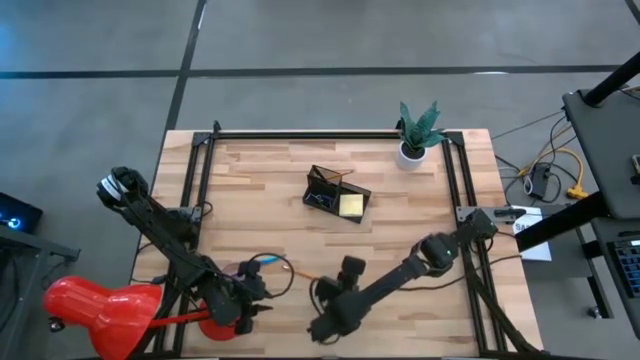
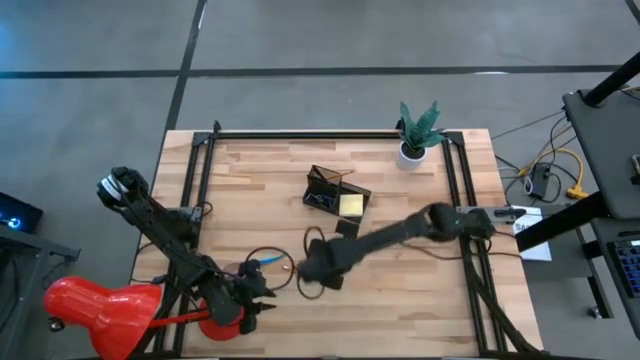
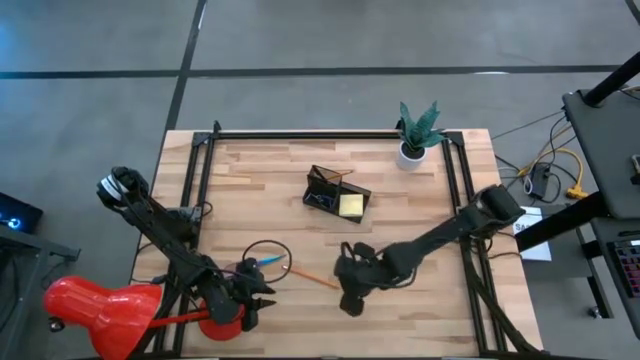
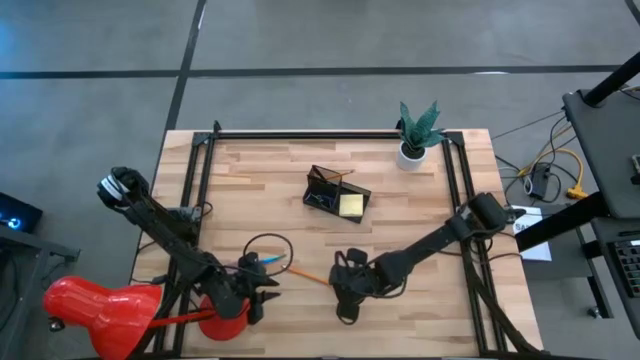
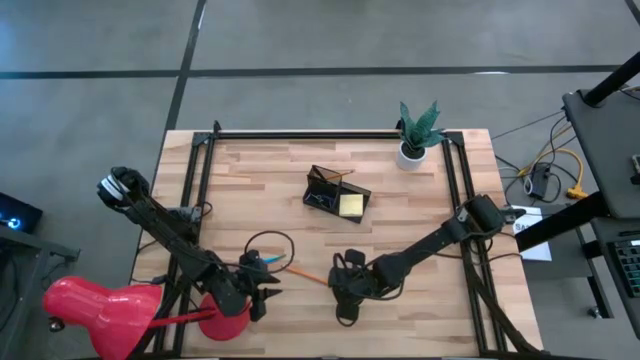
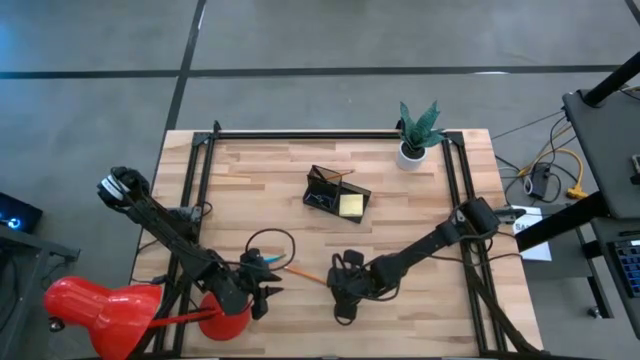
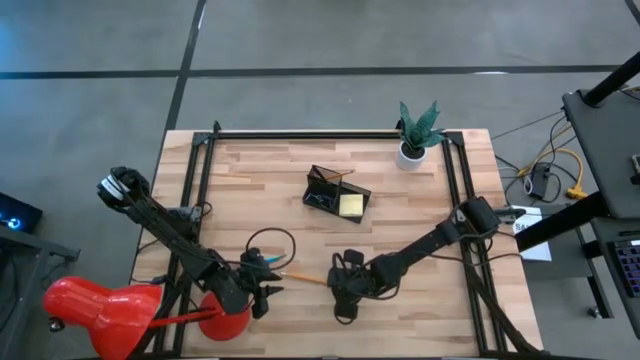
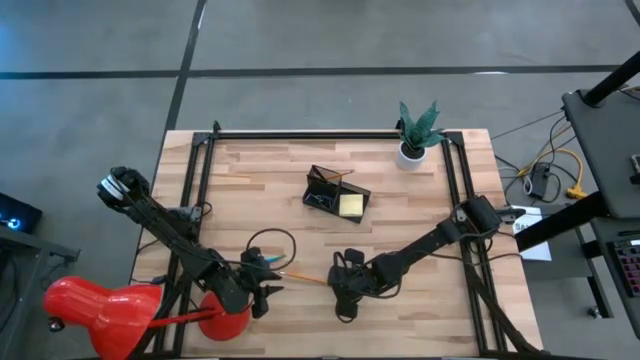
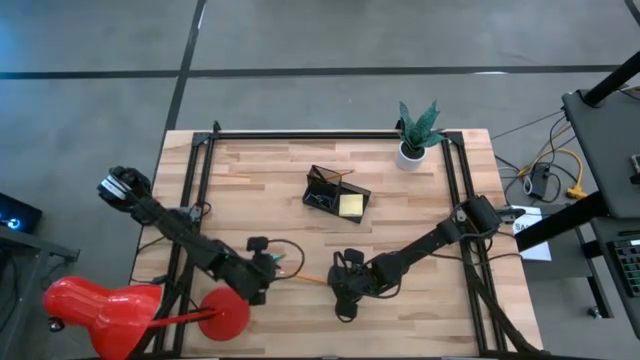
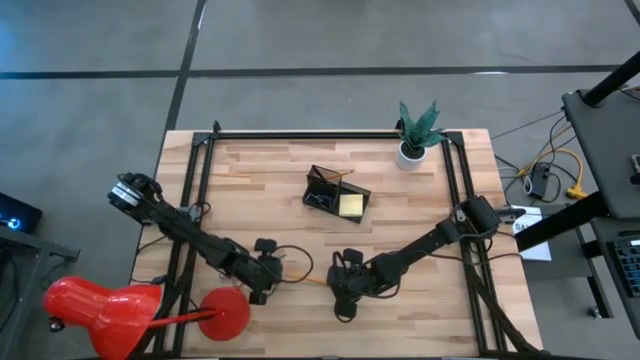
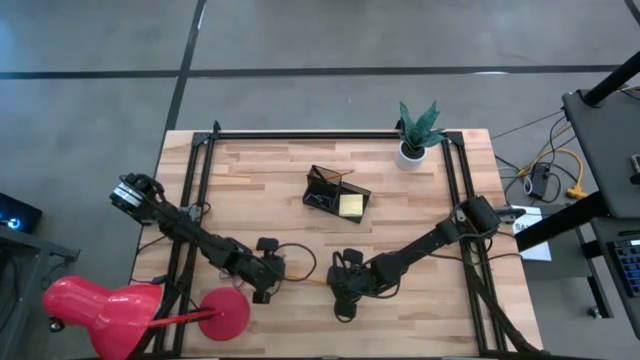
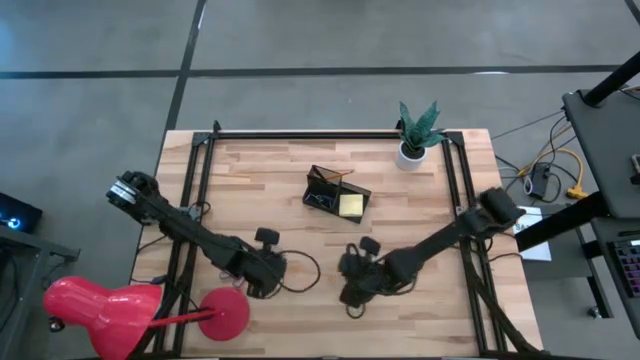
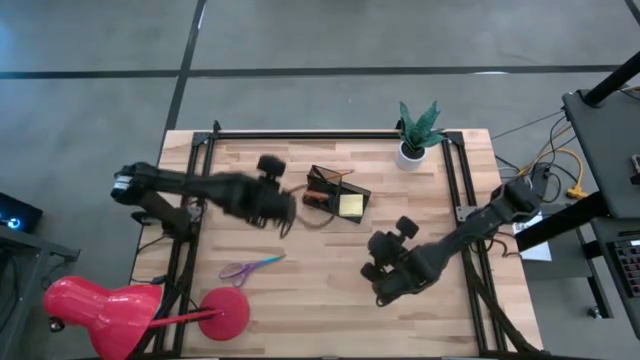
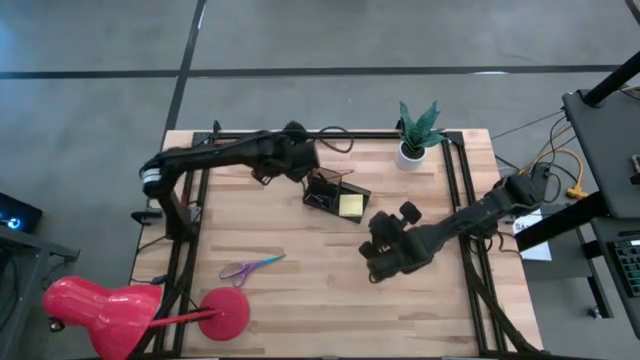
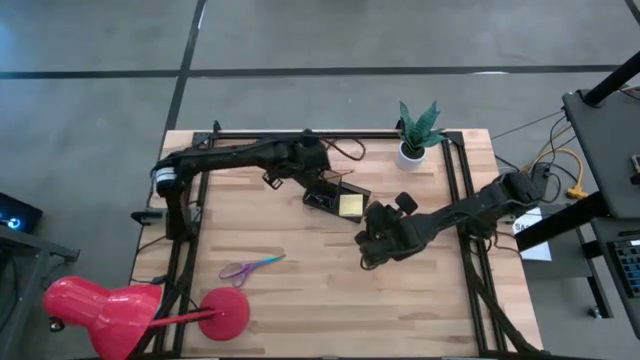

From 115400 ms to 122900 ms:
Task: Pick and place office supplies into organizer
Put the pencil into the desk organizer

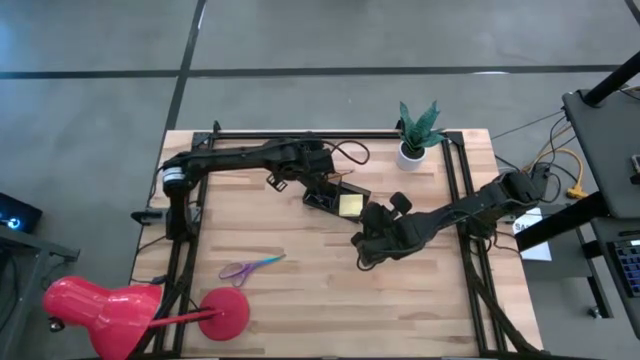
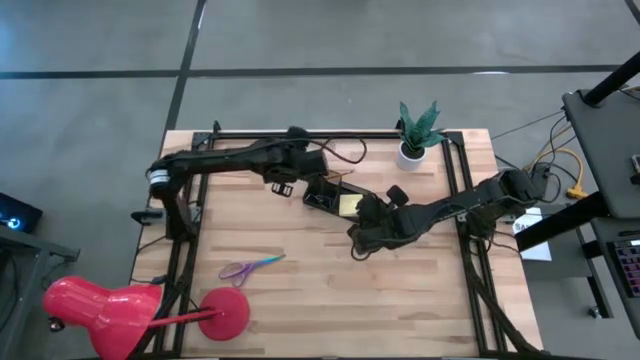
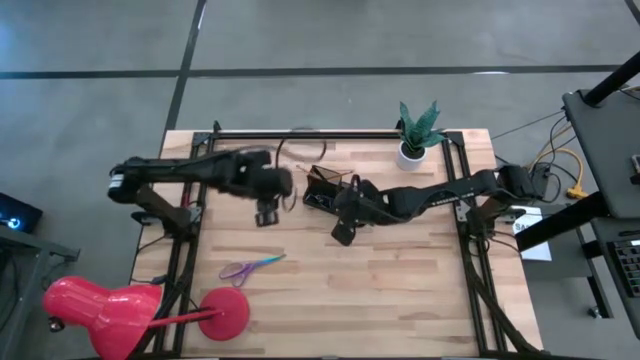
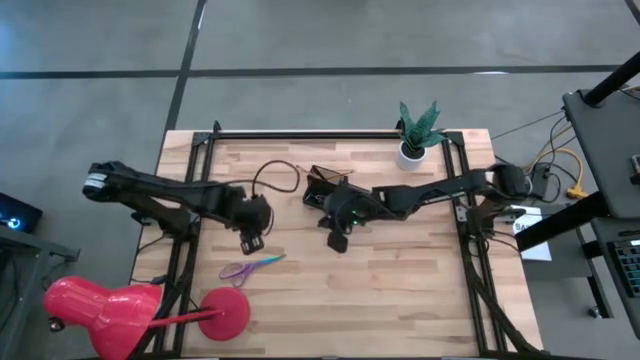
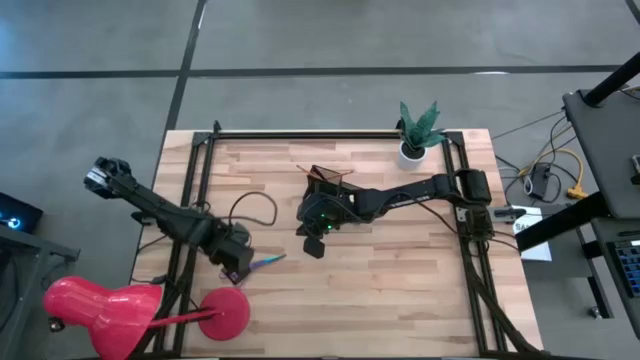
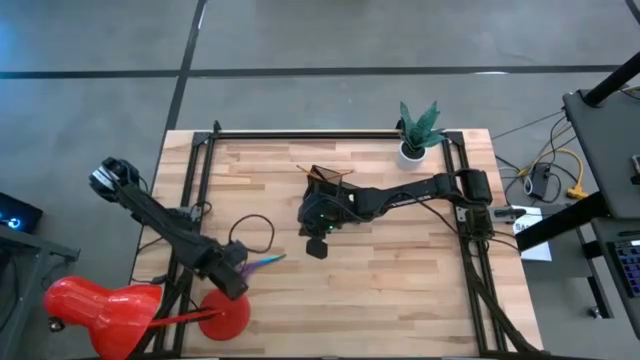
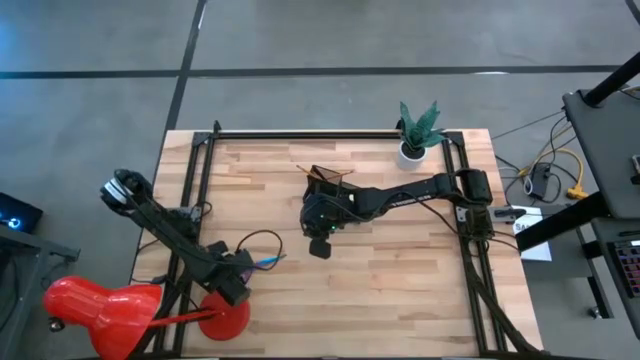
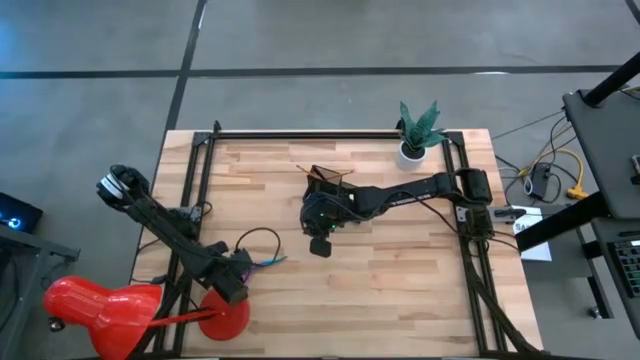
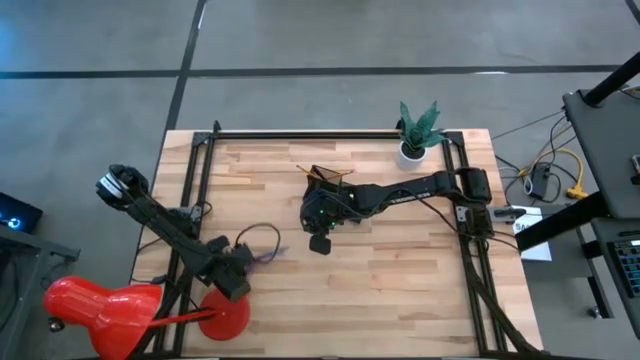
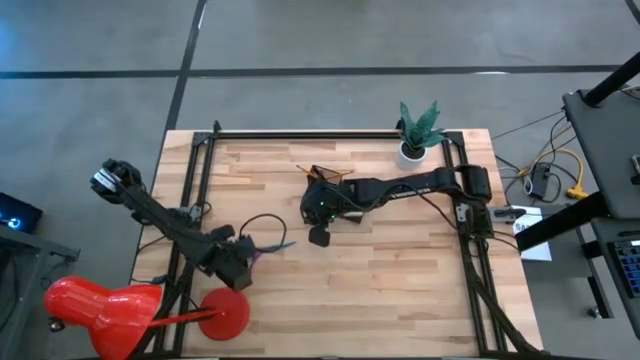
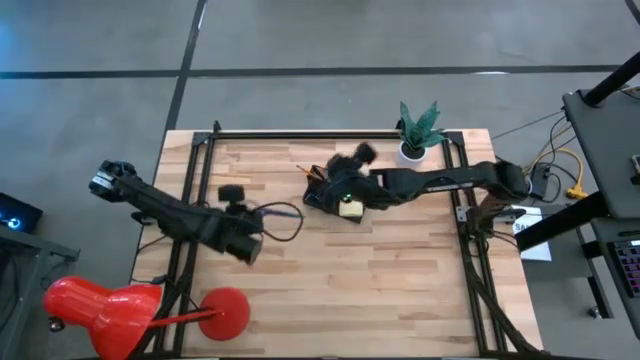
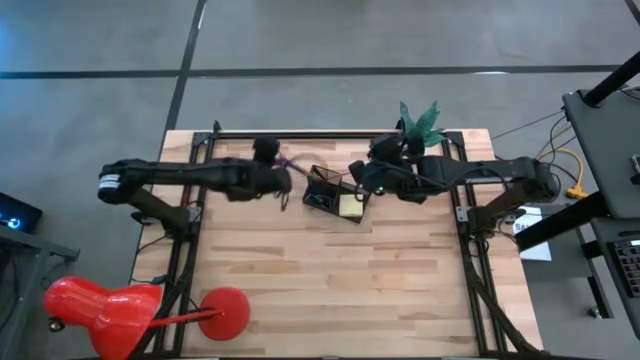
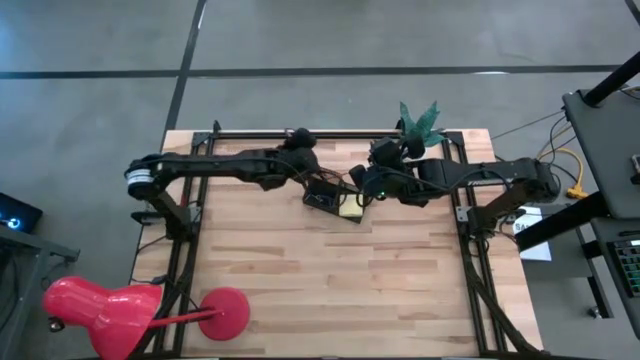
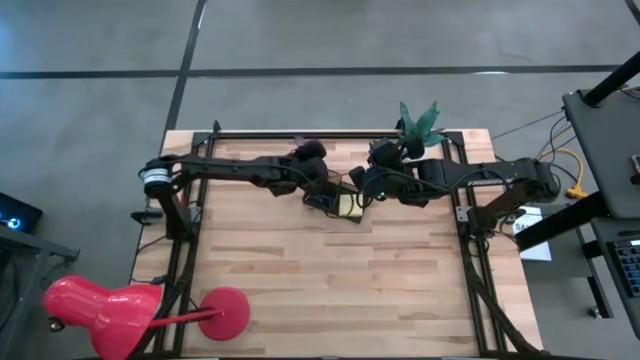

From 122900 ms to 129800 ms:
Put the scissors into the desk organizer

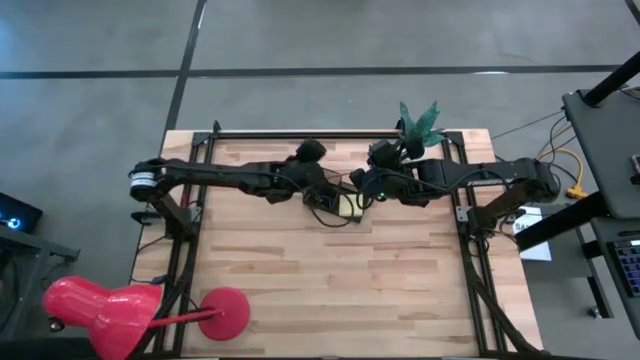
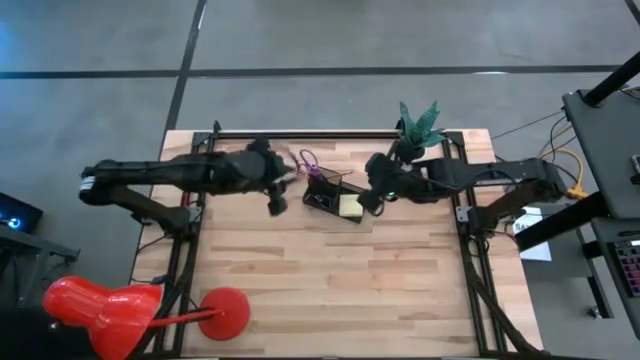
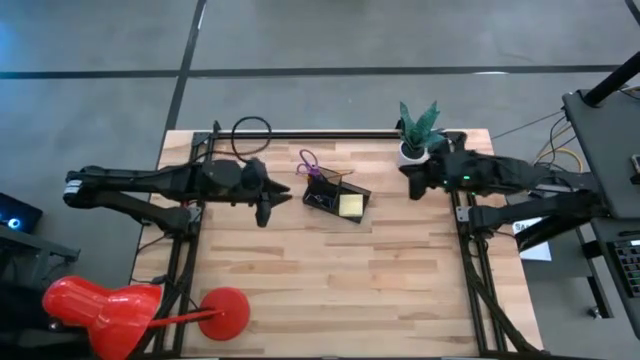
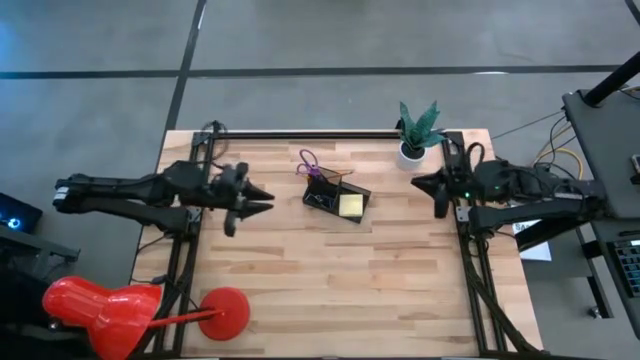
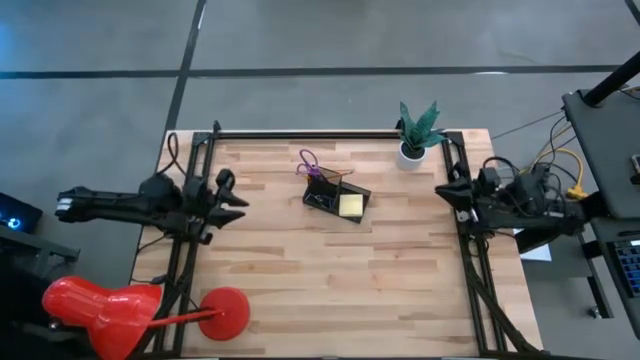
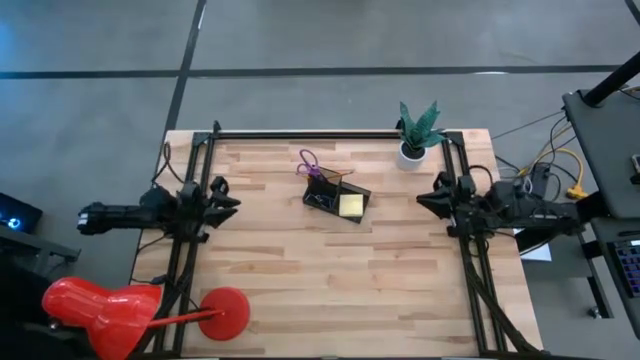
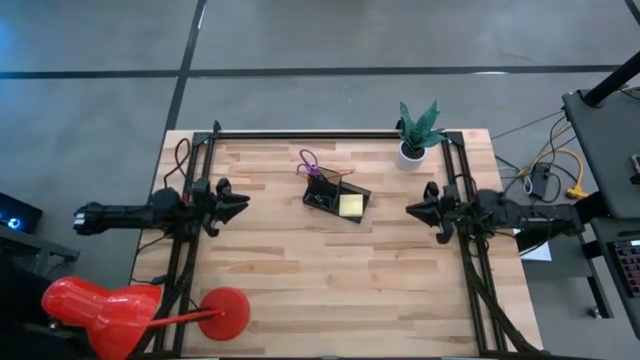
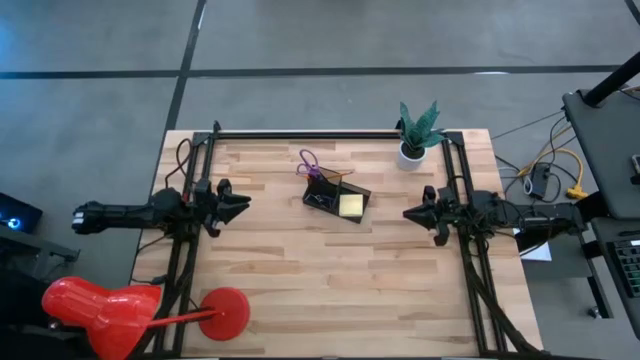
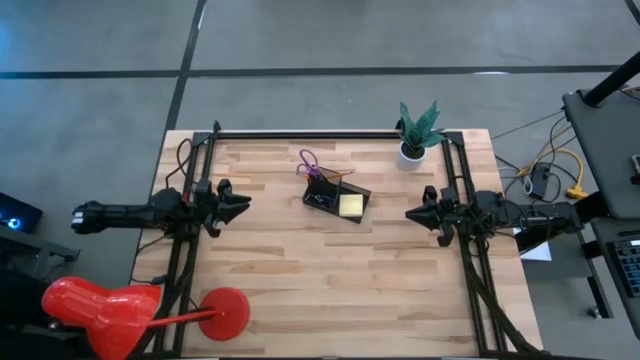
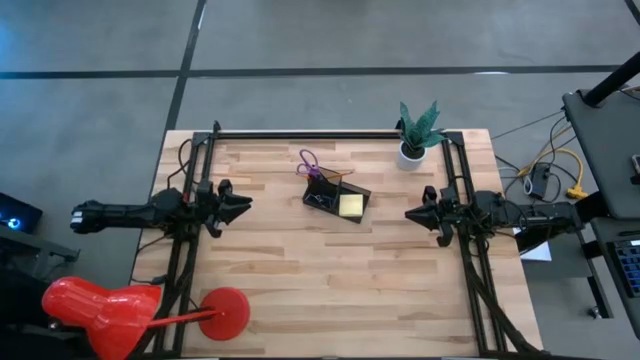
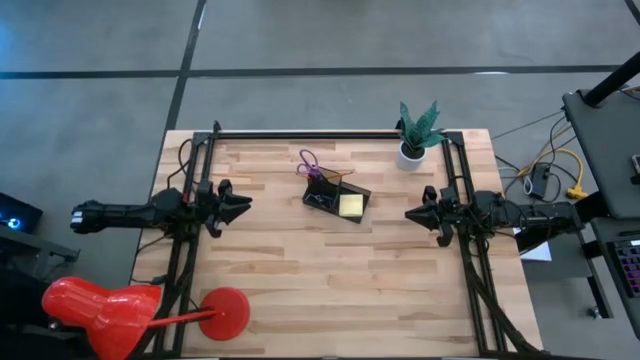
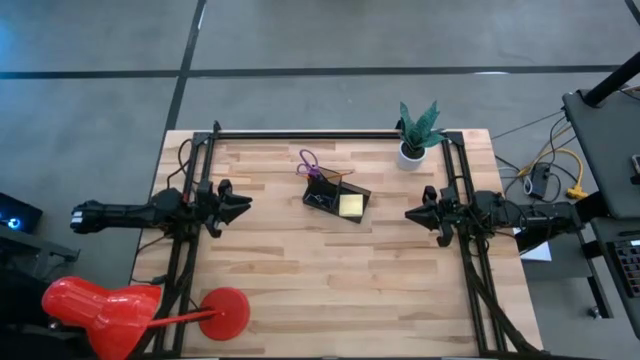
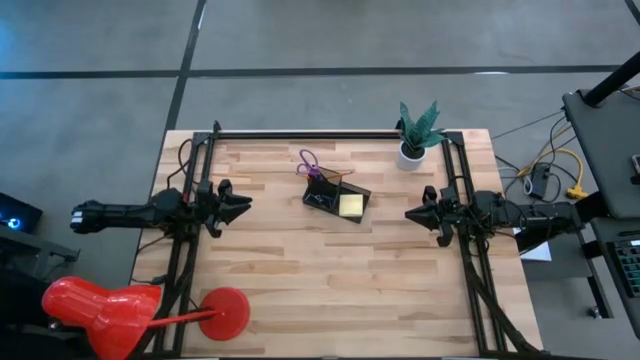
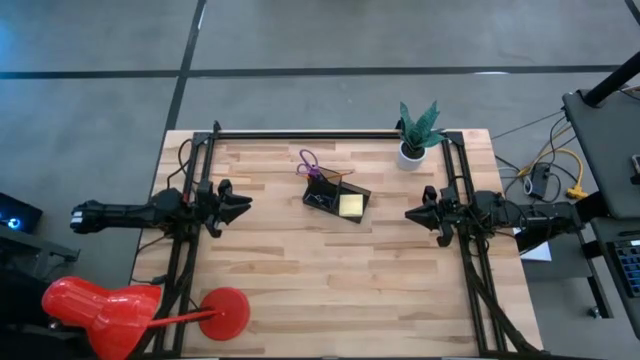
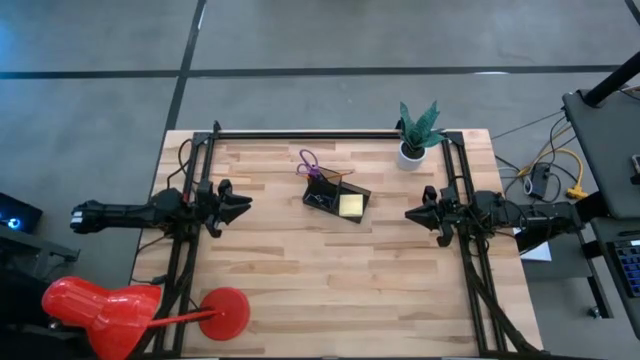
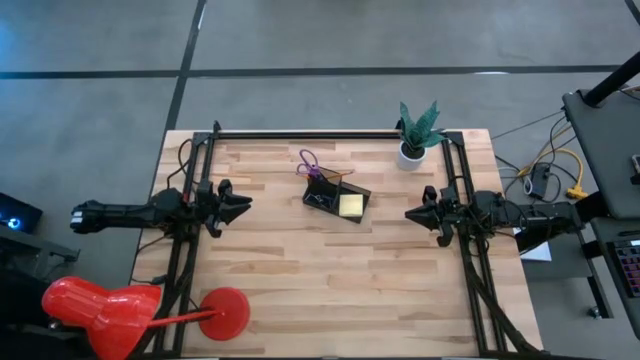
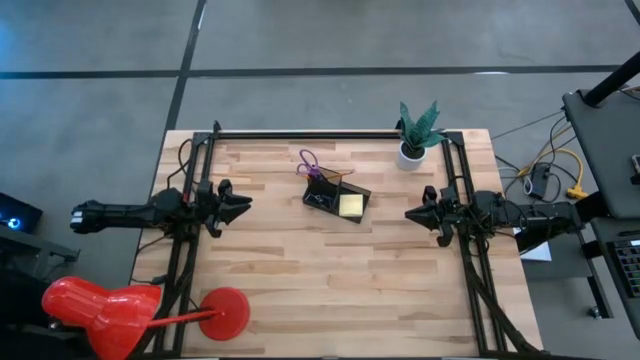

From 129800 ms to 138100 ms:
Return to Home Position
